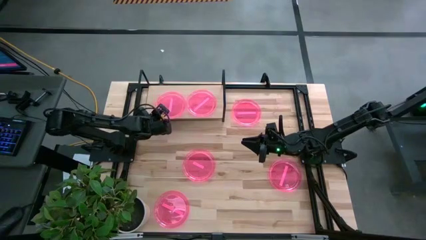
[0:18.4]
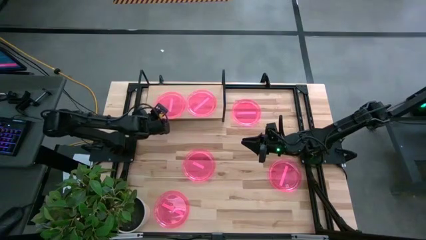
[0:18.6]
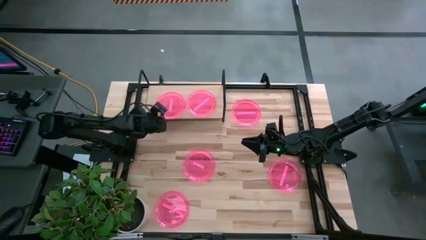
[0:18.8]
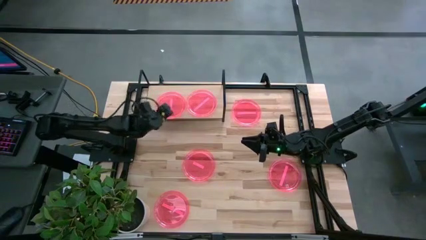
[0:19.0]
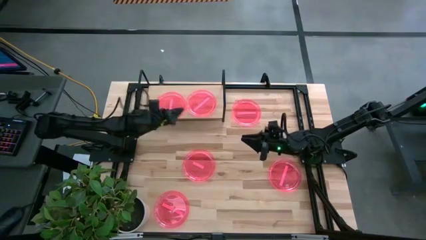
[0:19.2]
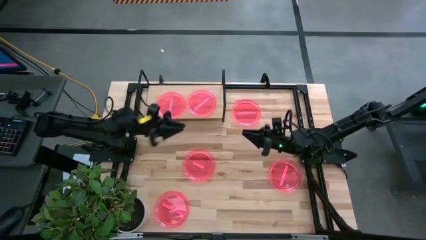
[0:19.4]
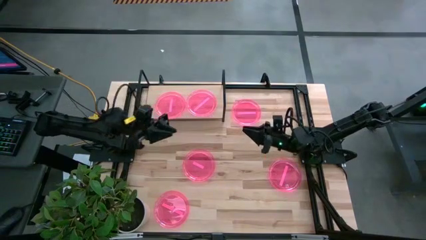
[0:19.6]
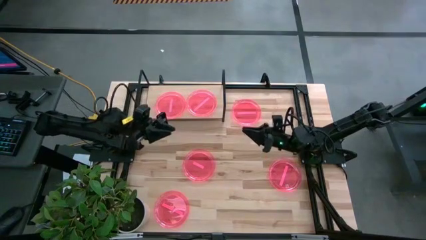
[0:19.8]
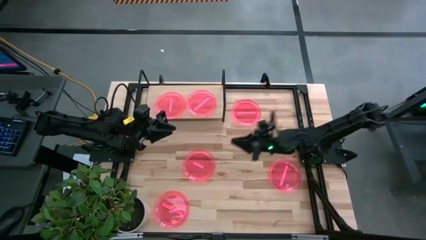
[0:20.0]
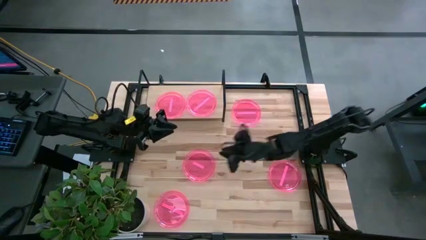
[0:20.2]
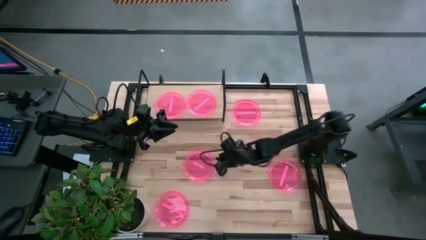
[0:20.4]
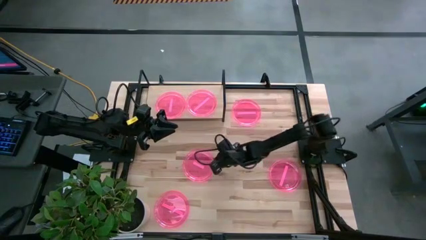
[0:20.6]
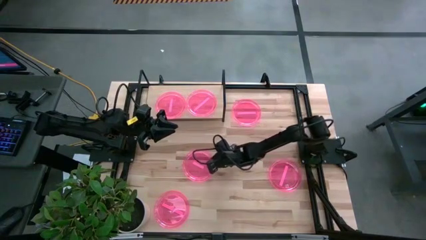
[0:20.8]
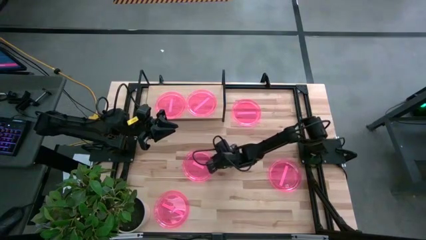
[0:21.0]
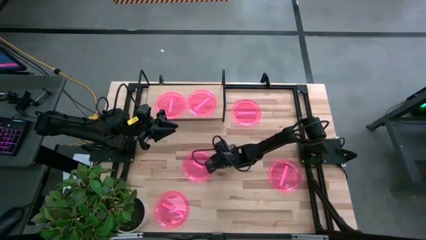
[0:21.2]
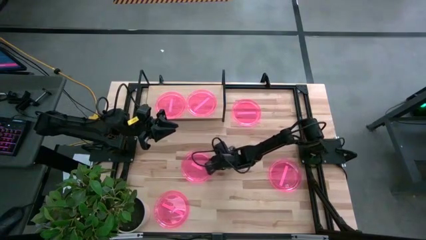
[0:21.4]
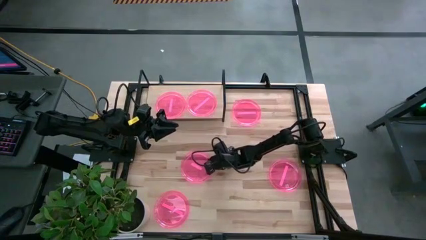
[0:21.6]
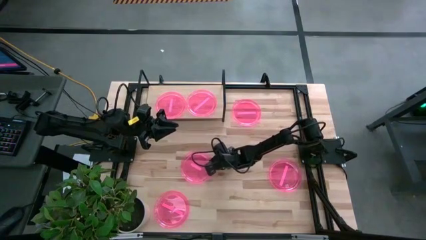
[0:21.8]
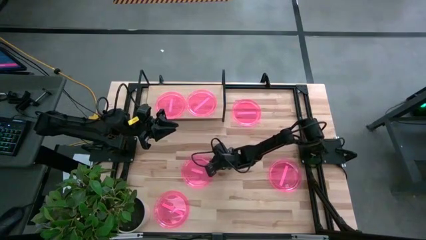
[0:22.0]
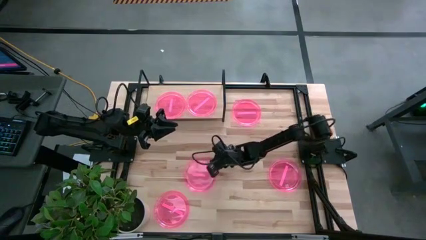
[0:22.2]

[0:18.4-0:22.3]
Task: Place and stack plates onto a shelf
Stack the pink plate on top of the pink plate on the shelf

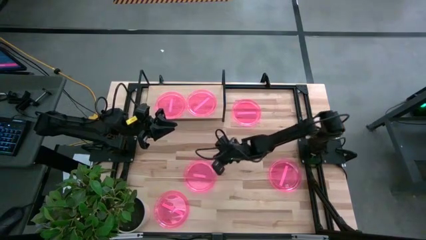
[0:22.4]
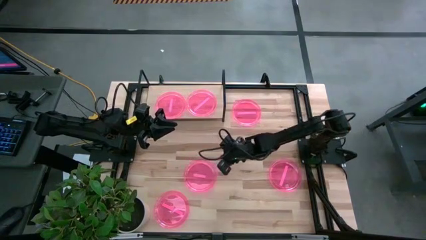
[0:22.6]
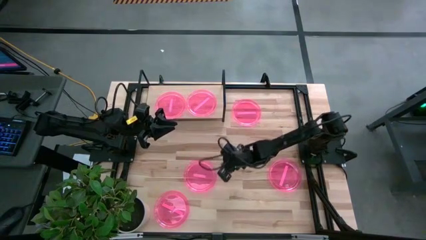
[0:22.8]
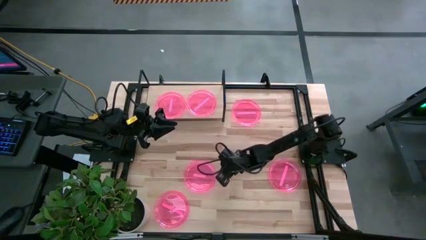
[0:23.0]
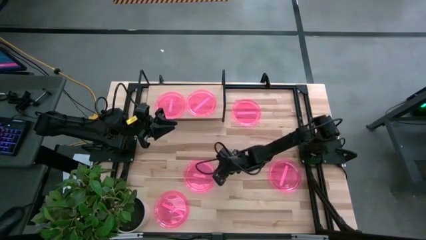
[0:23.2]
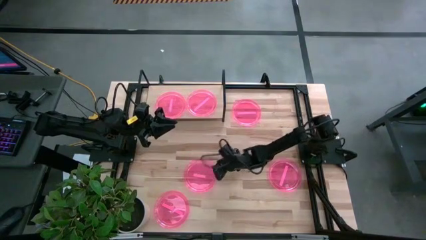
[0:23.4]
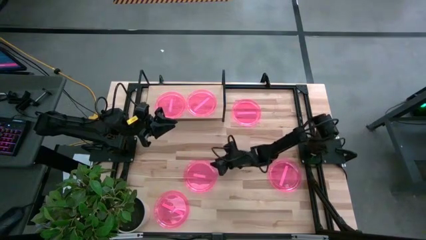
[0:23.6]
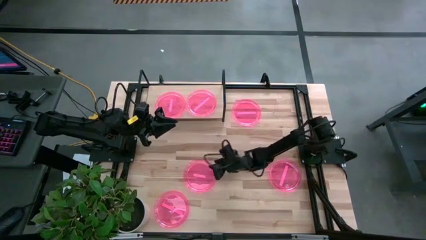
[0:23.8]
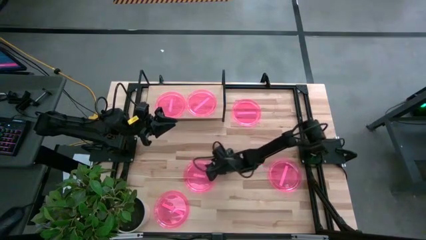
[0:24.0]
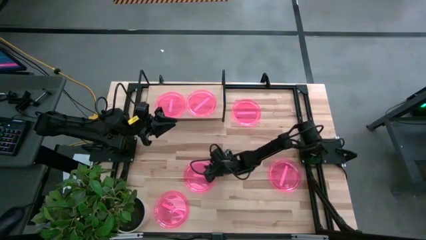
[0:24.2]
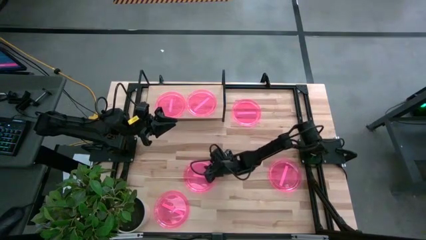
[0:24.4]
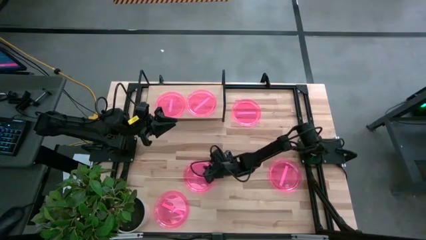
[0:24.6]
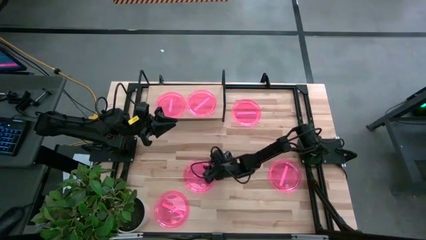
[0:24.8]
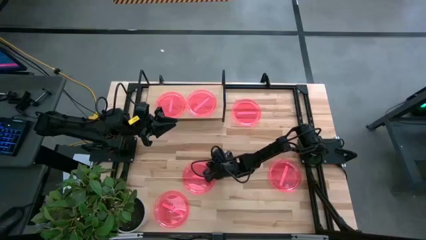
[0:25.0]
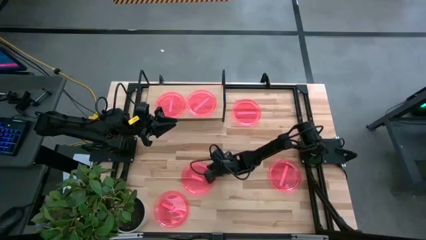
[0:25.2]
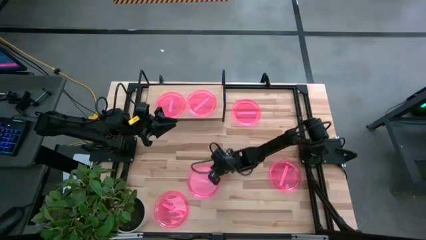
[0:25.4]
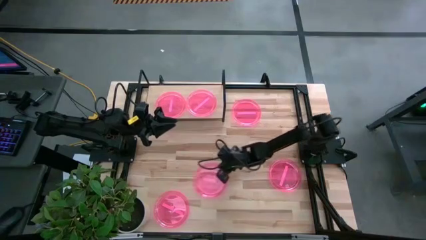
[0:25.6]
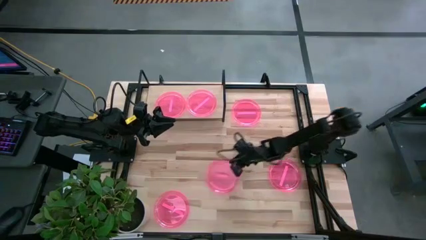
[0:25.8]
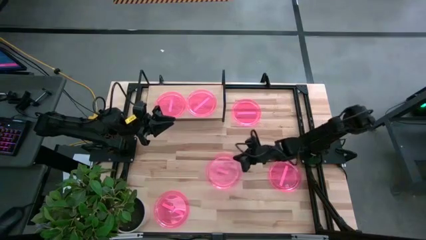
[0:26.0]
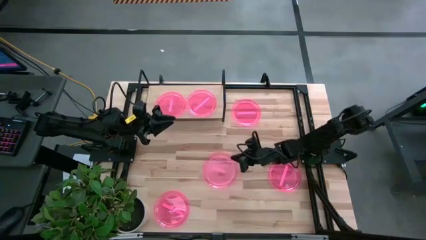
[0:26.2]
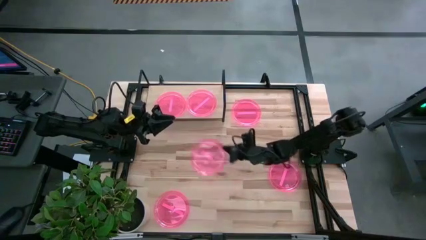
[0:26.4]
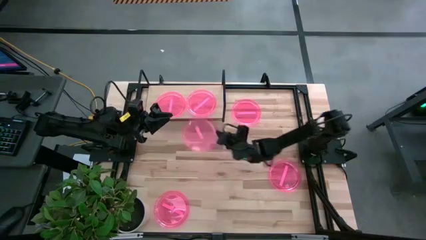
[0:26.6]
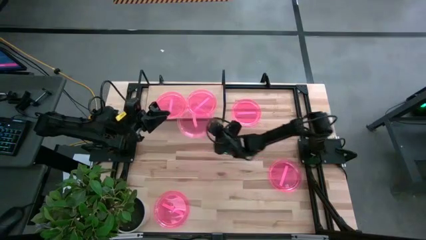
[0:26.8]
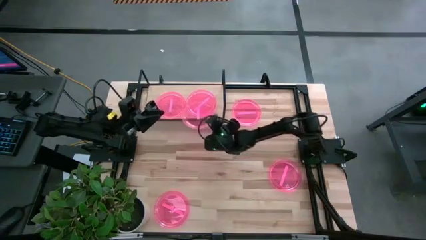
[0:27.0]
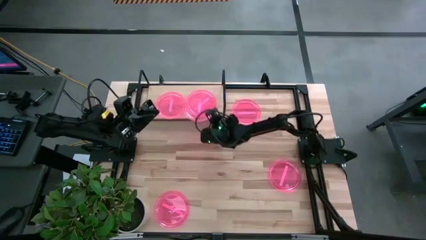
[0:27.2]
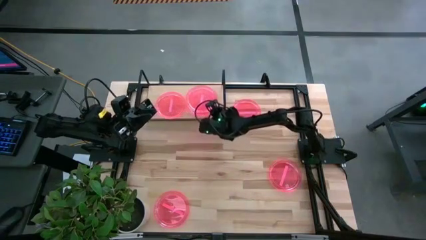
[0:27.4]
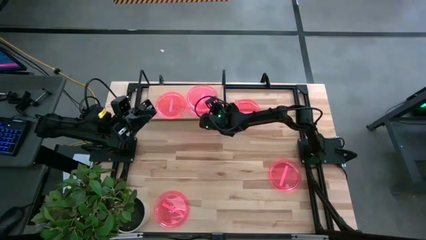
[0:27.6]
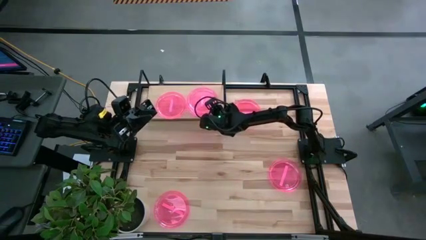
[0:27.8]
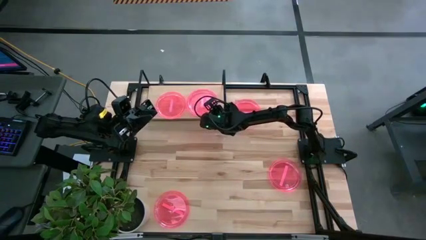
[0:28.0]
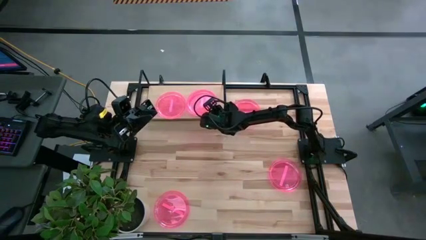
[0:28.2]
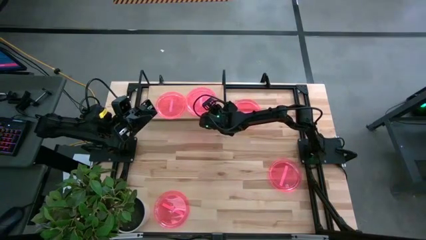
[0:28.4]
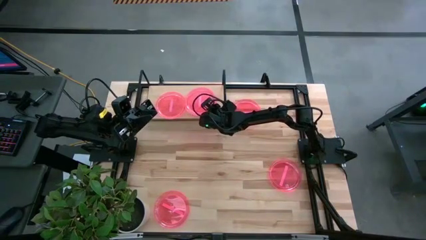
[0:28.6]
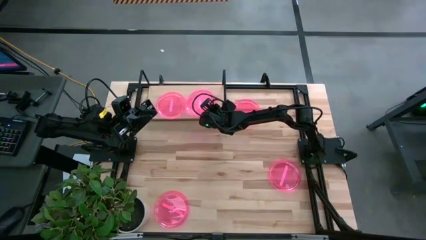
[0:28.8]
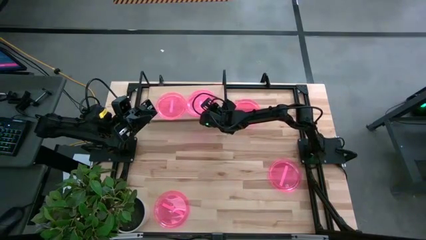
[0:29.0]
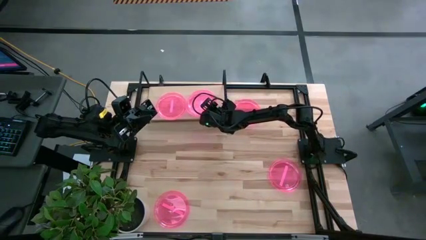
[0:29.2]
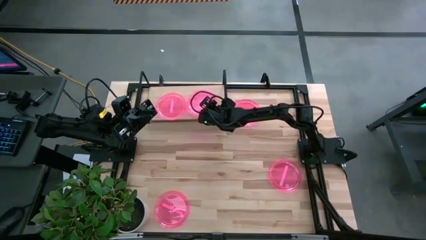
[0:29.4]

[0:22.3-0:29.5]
Stack the pink plate on top of the pink plate on the shelf

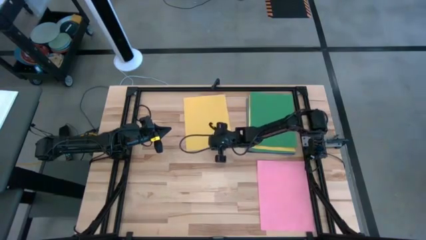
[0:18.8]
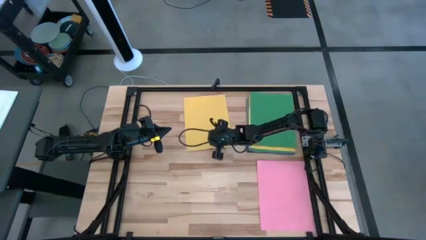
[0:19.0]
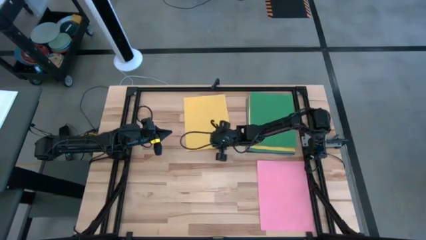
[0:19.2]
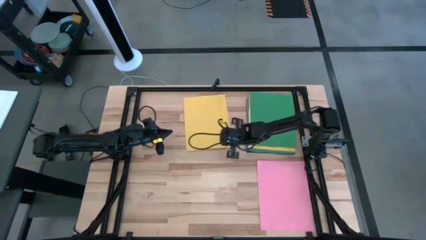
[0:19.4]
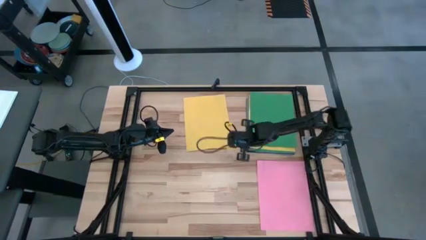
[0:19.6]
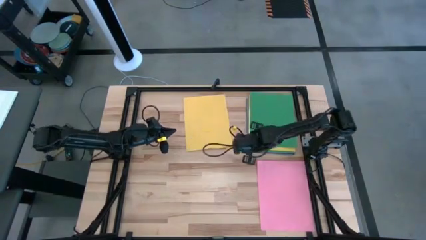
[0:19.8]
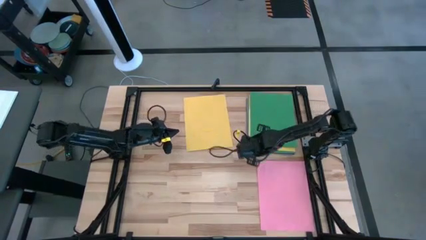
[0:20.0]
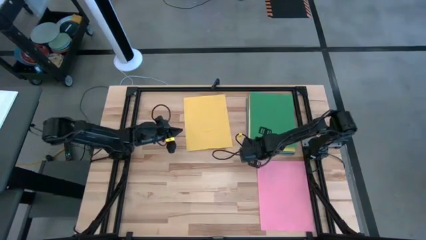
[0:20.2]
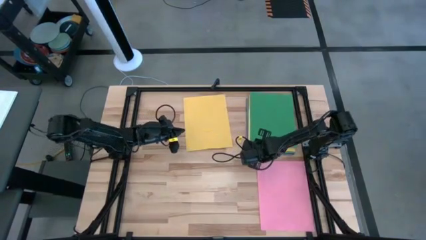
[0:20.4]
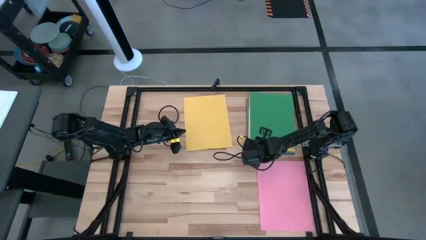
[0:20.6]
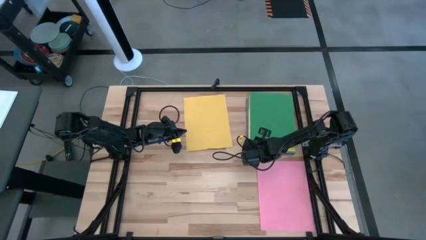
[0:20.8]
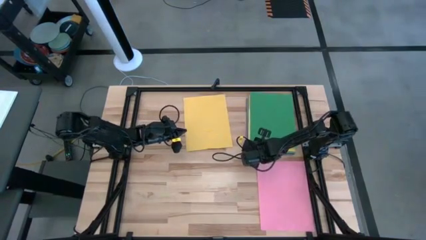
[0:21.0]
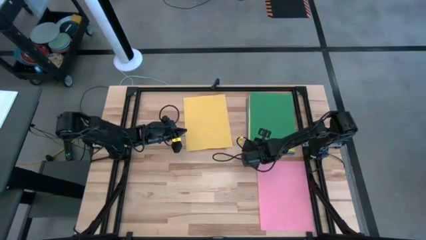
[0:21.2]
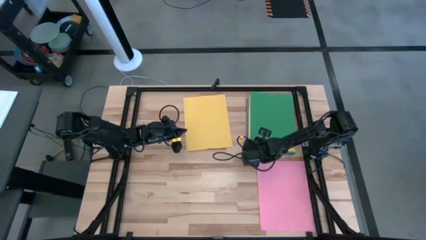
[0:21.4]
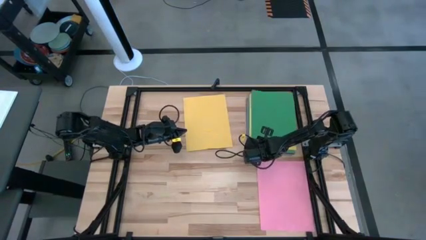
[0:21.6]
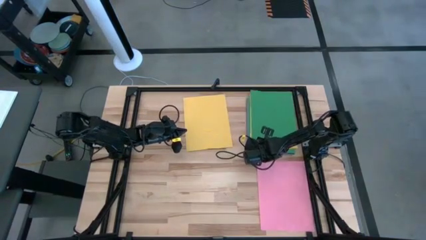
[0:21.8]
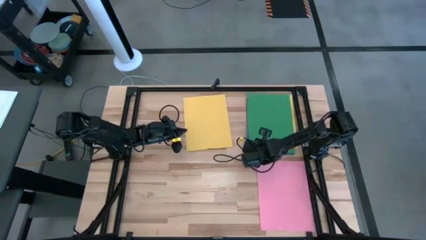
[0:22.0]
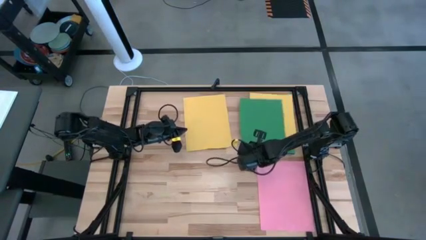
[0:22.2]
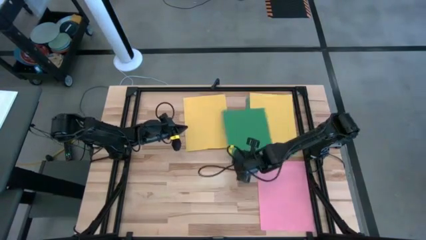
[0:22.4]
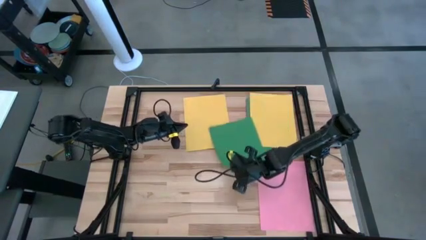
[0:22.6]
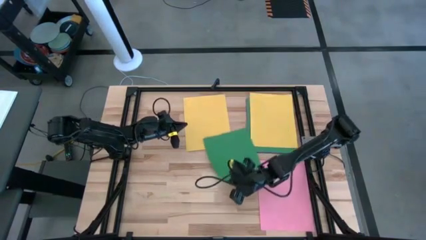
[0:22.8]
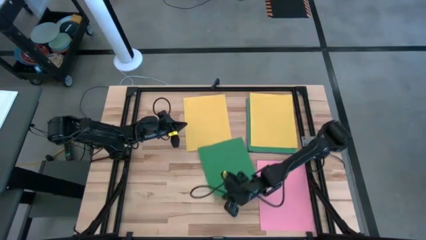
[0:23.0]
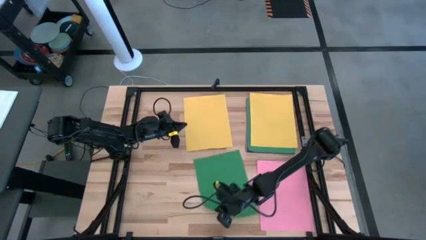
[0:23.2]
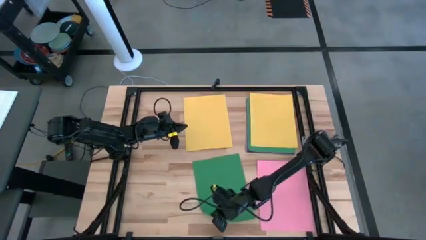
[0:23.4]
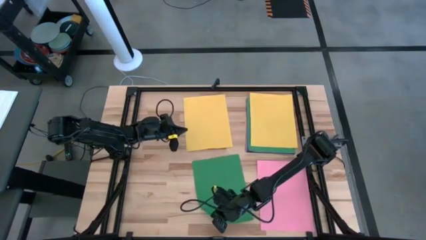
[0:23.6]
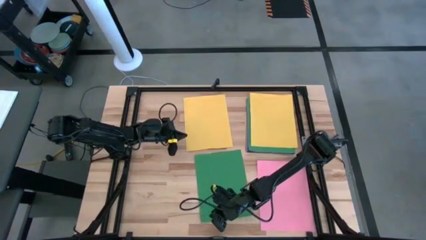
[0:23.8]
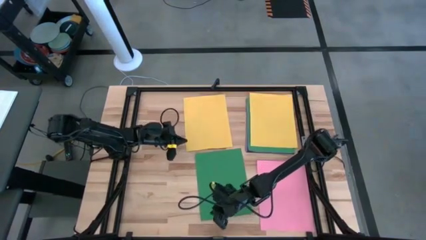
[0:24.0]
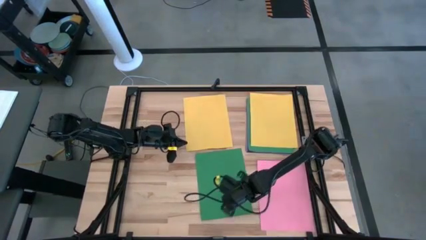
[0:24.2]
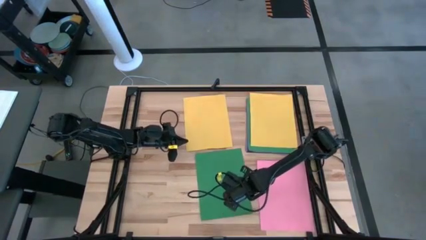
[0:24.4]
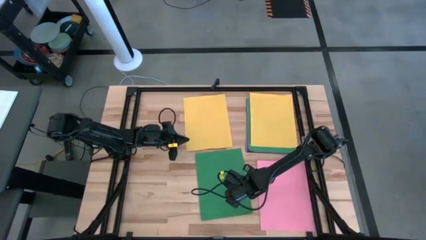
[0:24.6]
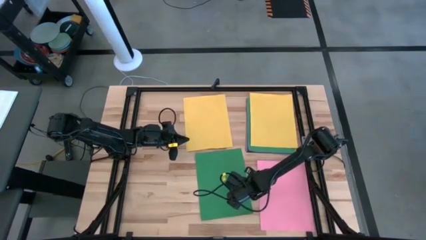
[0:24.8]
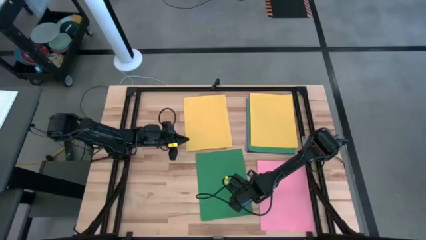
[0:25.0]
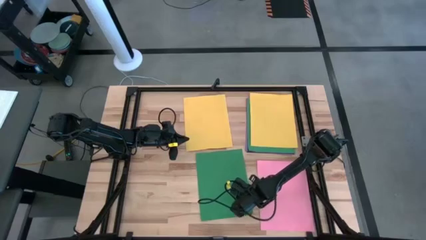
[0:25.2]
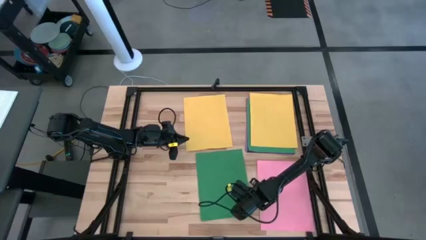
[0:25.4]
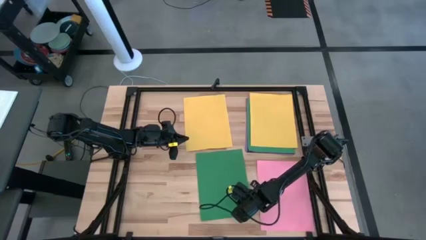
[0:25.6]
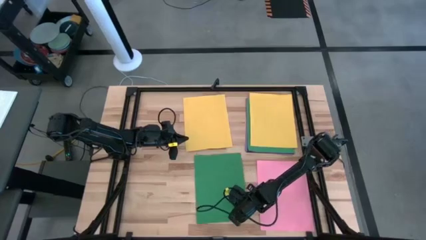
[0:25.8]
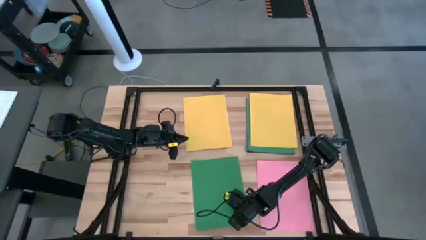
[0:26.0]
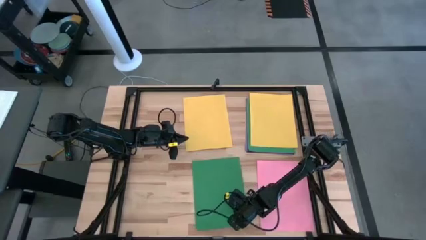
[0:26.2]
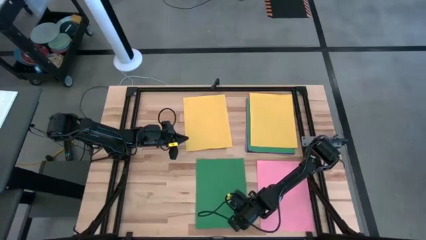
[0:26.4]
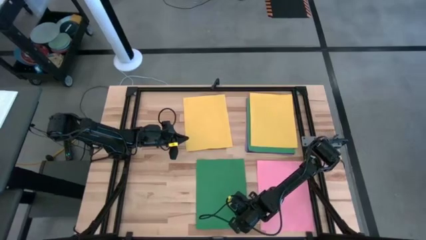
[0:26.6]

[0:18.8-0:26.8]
Task: Organize paper
Move the green paper to the bottom center of the table
